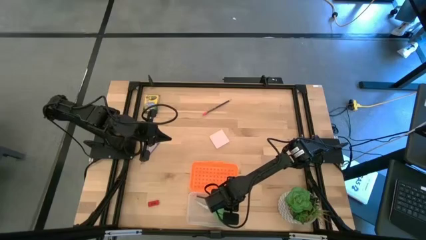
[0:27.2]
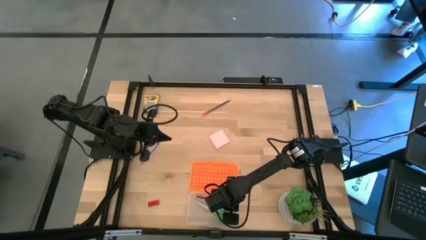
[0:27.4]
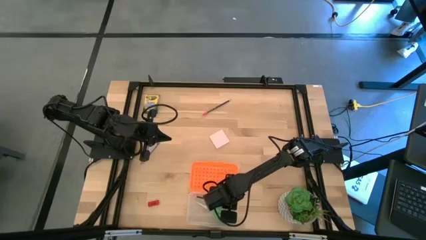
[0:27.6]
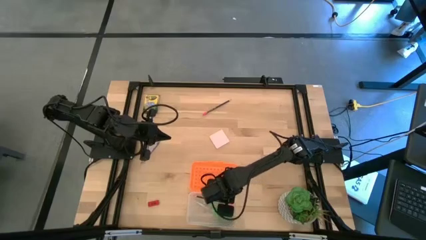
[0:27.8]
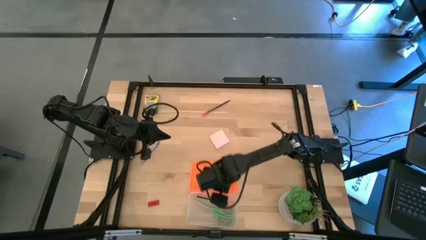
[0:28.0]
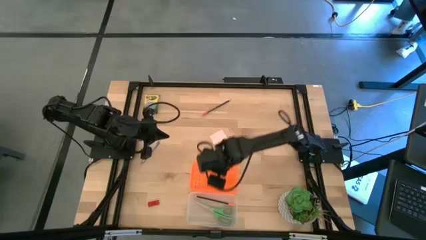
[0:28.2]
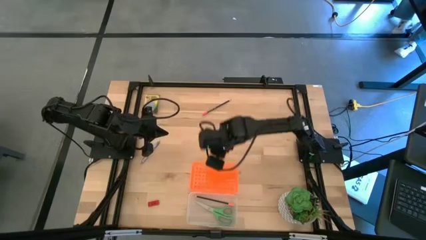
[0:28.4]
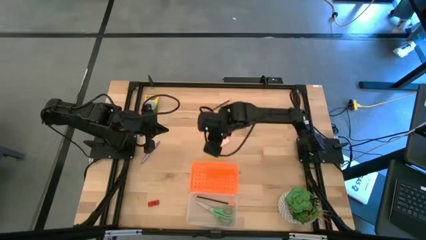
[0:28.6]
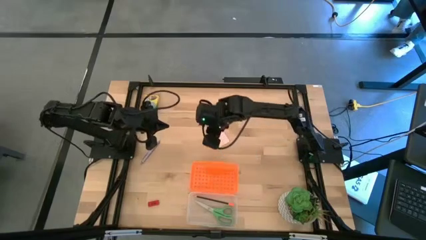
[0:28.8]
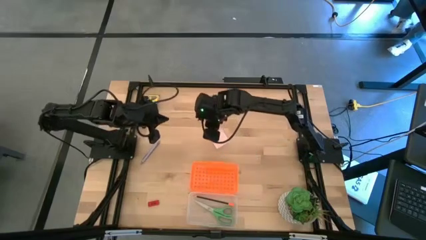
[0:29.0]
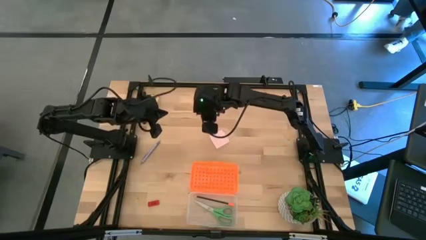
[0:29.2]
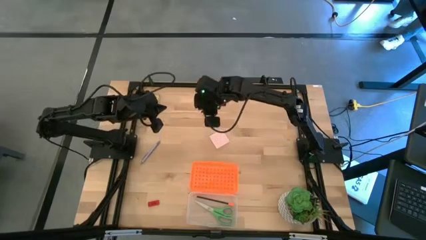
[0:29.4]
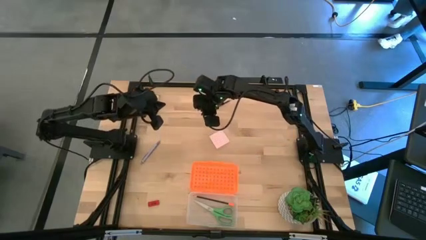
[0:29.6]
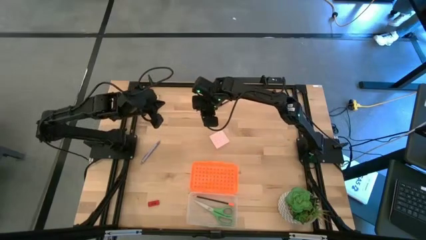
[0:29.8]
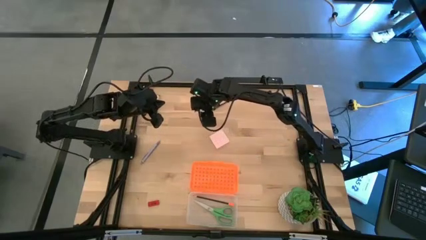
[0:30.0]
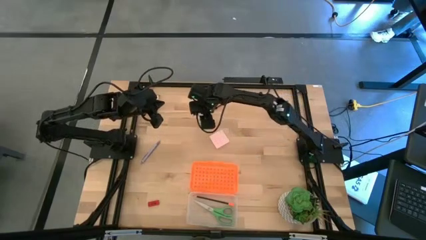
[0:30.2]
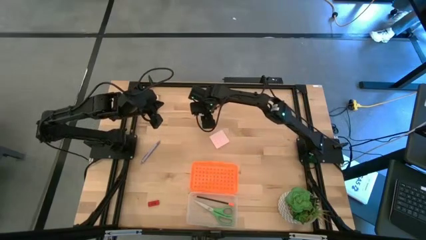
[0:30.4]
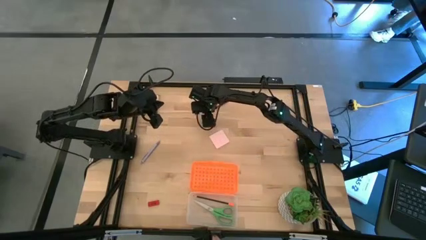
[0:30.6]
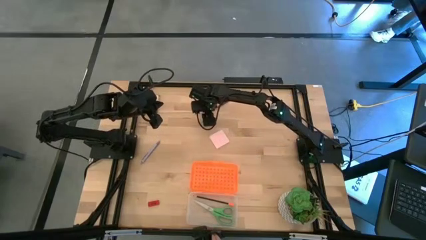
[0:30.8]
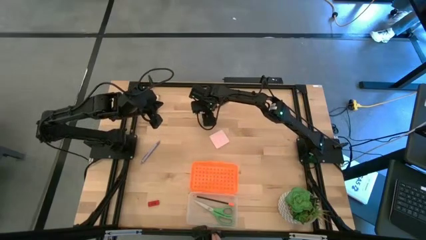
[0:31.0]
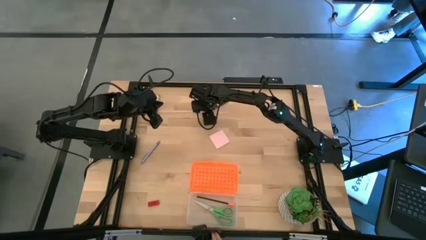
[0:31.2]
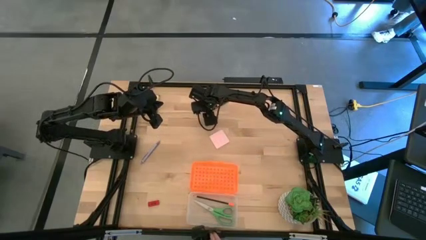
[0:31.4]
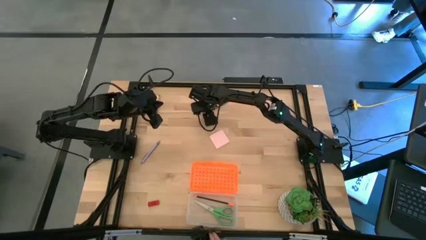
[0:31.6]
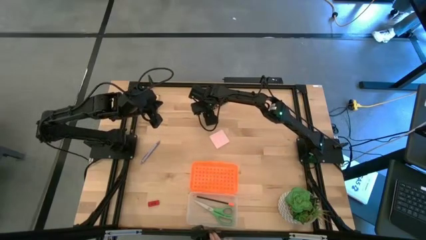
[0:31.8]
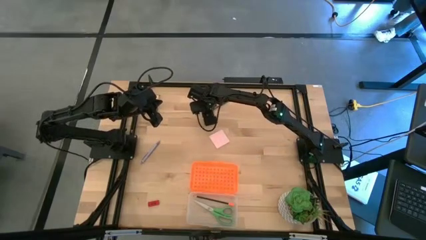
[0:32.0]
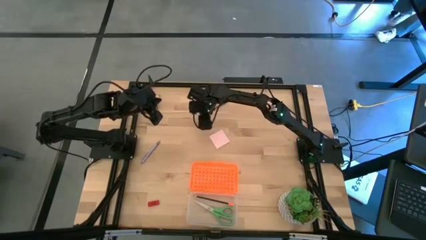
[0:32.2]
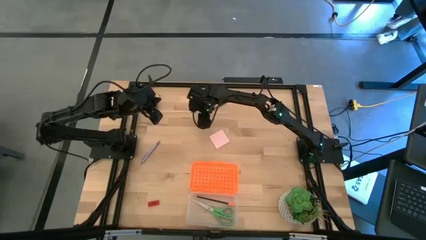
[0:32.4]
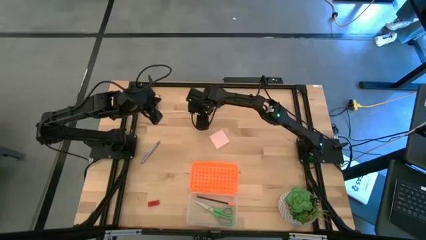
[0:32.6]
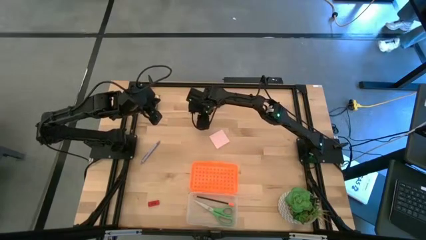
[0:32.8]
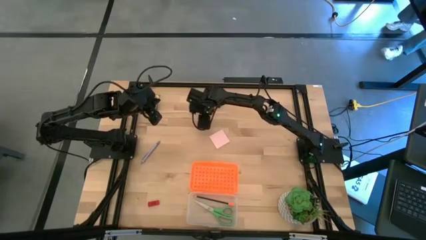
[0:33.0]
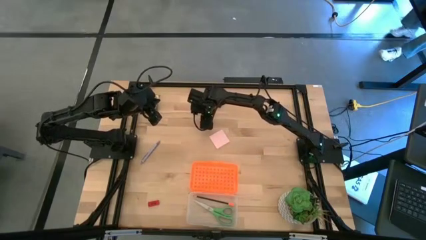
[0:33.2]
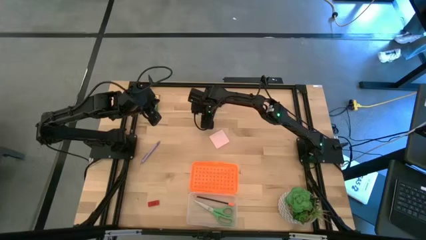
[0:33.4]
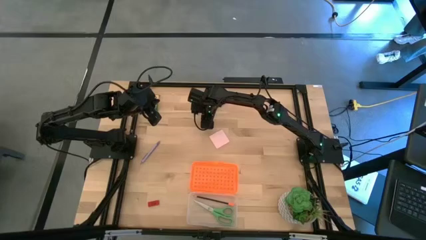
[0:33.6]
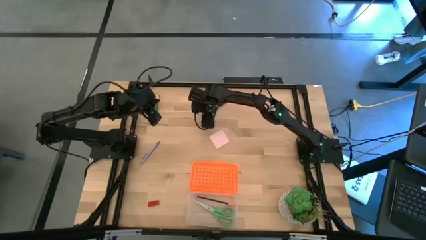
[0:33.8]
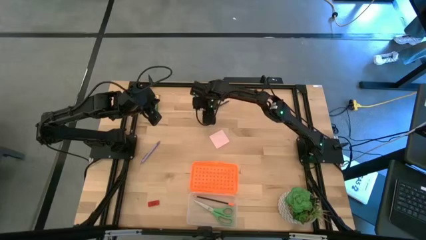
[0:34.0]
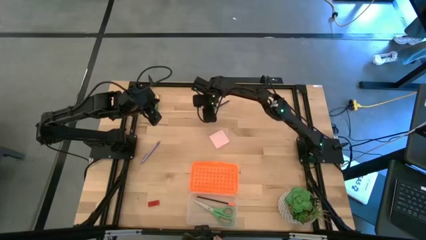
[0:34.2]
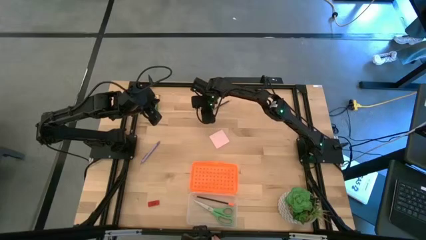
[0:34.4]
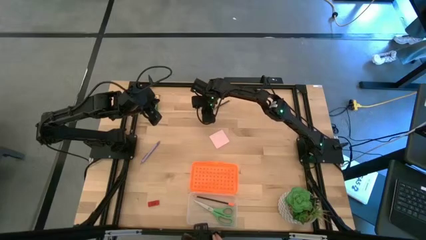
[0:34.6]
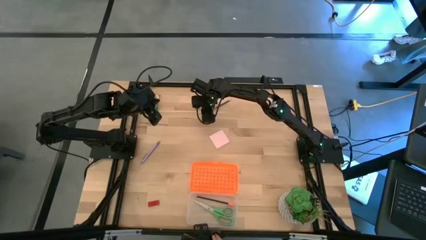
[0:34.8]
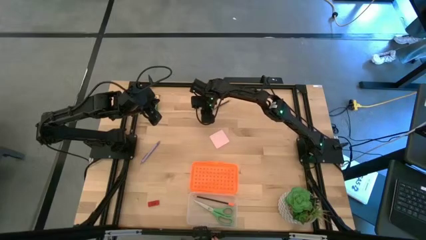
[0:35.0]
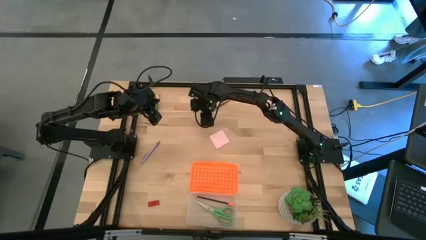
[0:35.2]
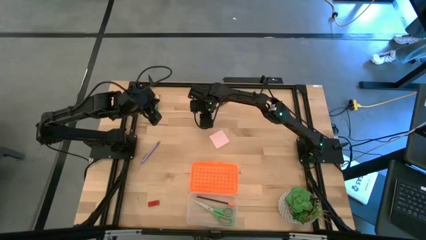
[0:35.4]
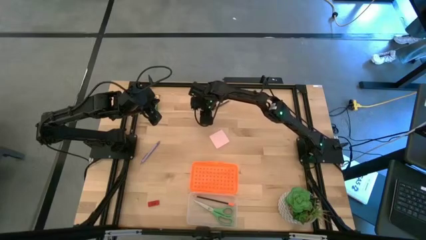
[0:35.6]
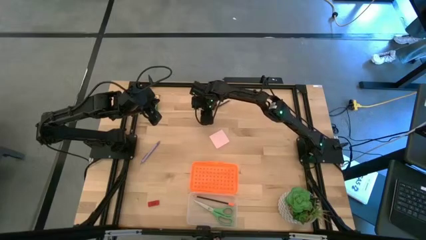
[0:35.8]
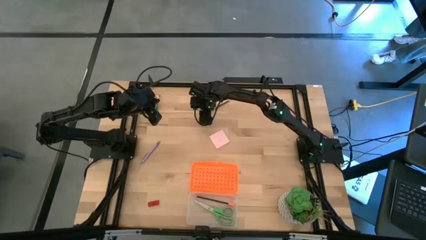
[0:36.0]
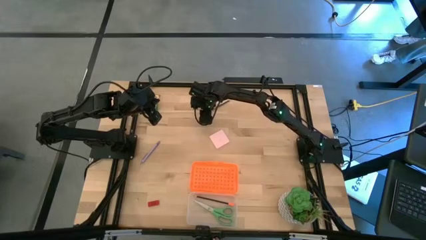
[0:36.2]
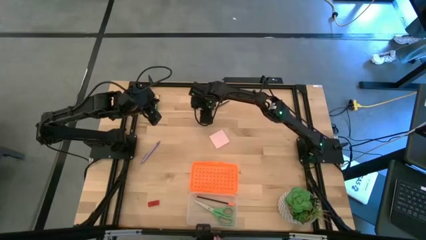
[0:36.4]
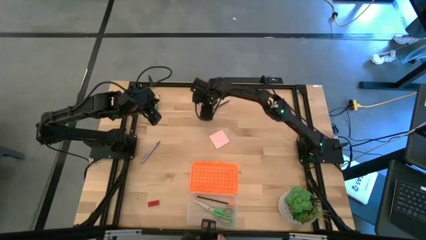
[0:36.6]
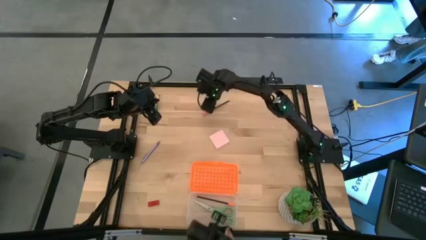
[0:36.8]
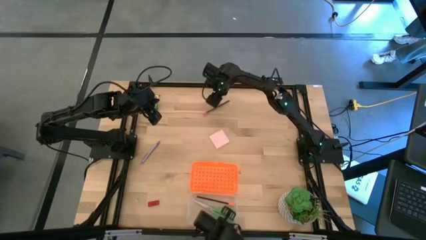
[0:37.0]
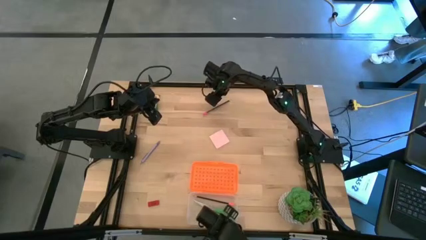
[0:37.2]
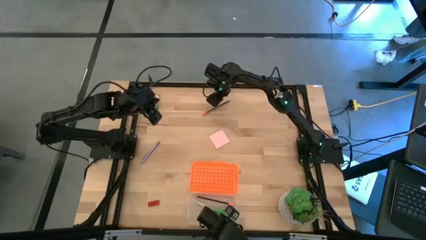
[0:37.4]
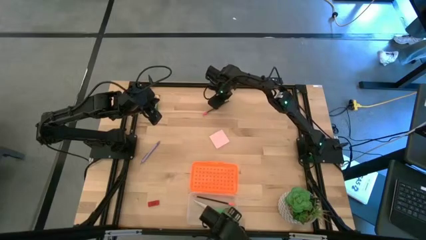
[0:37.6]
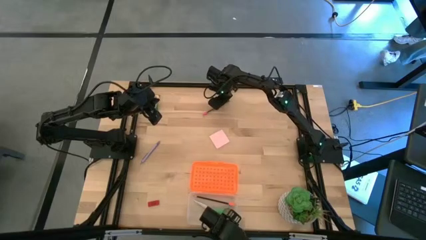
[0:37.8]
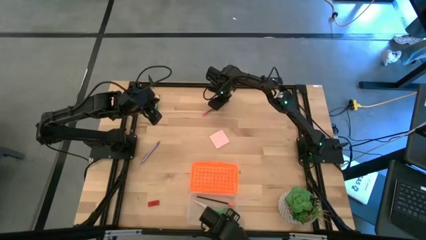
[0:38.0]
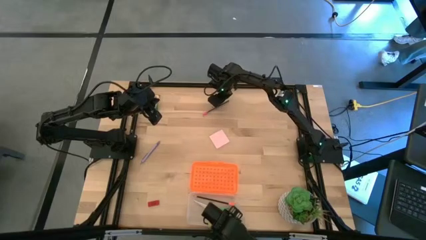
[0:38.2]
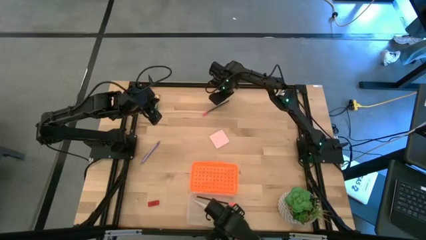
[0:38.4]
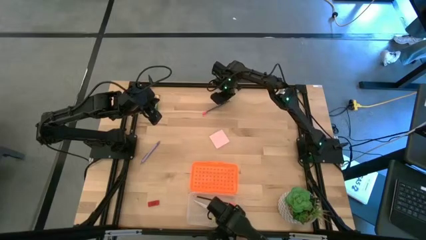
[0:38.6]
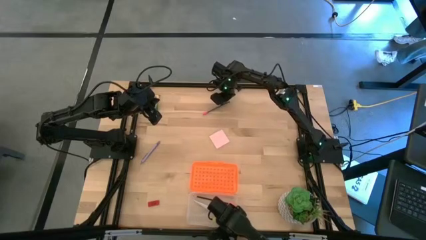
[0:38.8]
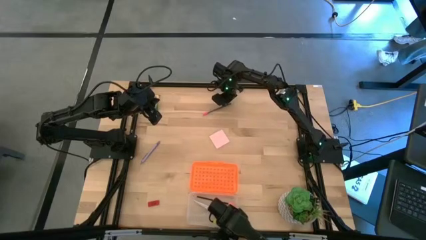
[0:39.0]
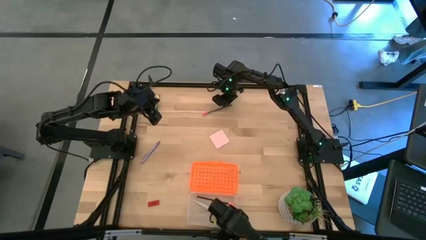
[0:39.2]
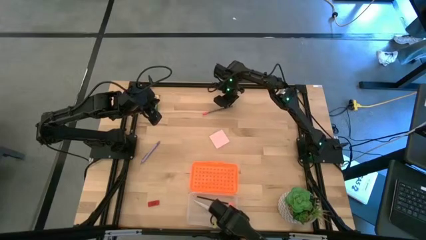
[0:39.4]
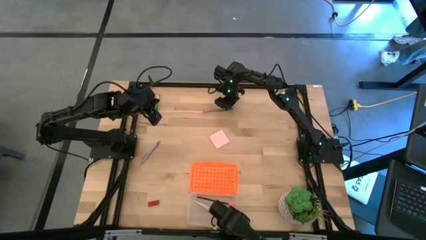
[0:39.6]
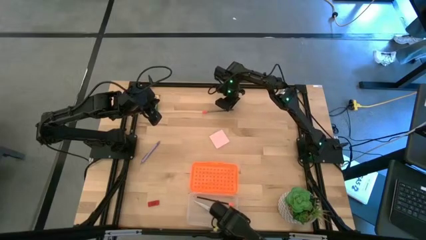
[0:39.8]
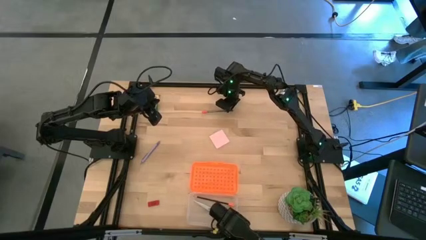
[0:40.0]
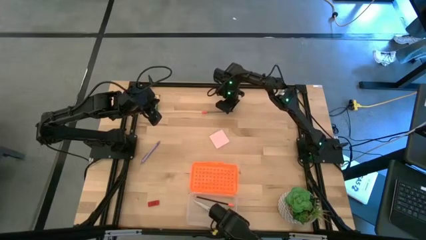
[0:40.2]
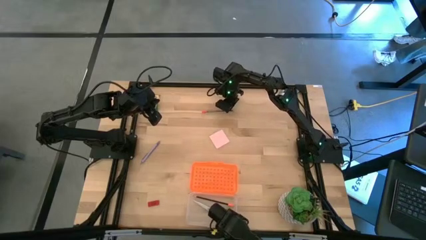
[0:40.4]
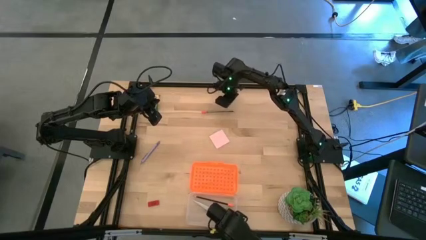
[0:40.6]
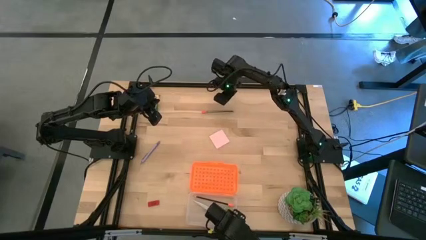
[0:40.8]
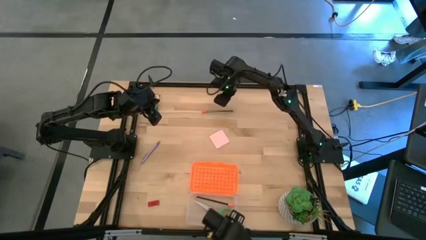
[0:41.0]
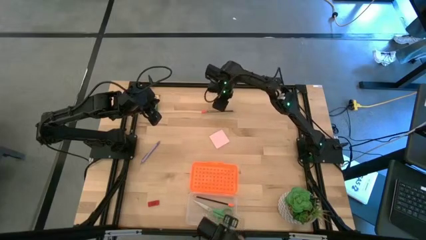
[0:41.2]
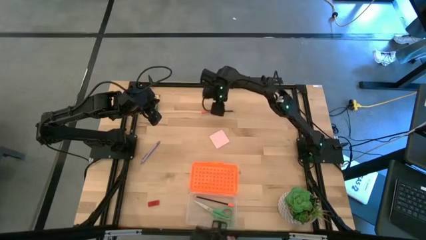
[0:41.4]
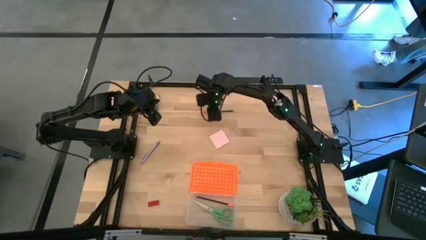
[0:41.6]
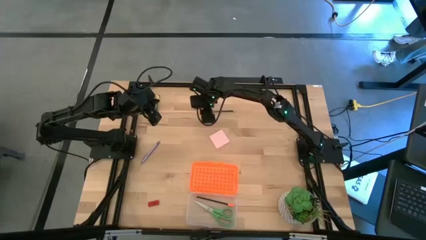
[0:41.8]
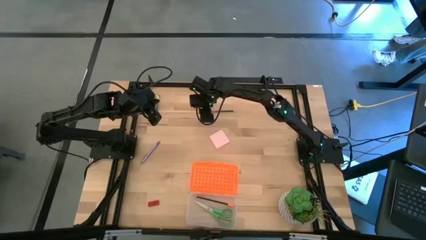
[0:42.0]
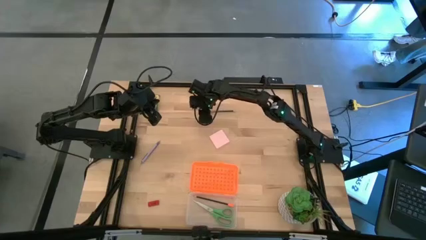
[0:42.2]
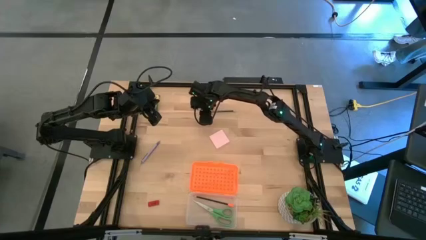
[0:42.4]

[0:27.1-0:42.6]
Task: Pack school essentials
Put the dark blue pencil into the orange supply box
